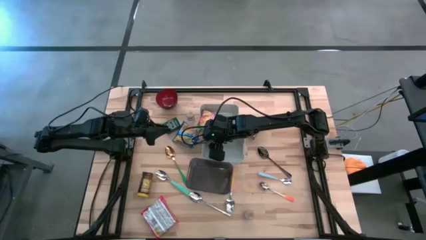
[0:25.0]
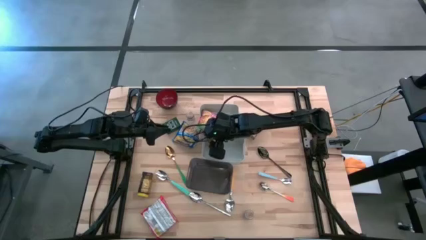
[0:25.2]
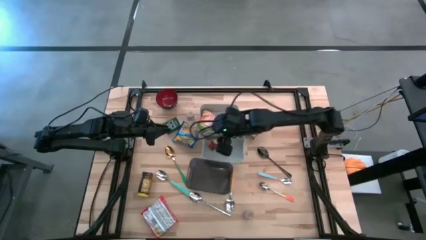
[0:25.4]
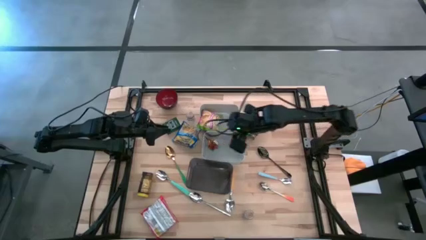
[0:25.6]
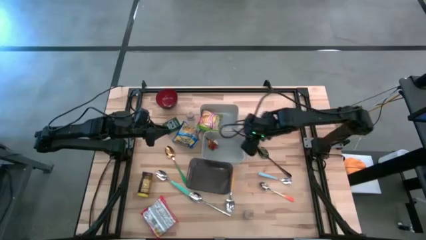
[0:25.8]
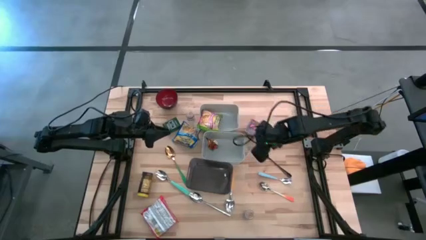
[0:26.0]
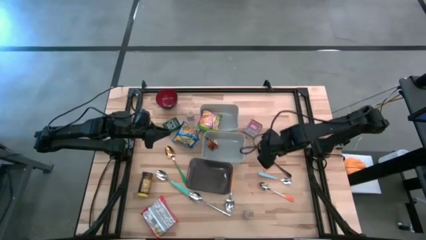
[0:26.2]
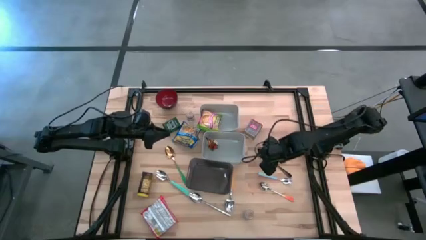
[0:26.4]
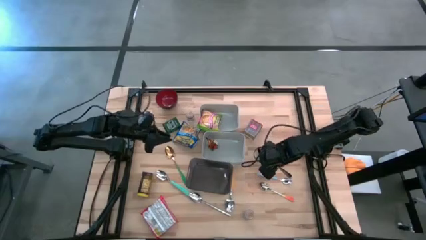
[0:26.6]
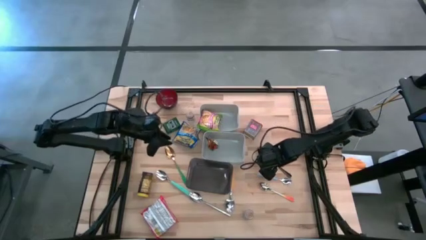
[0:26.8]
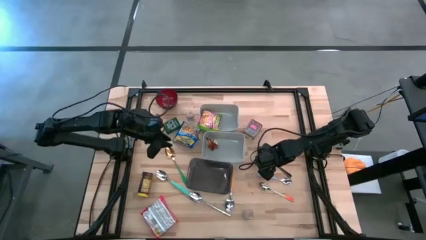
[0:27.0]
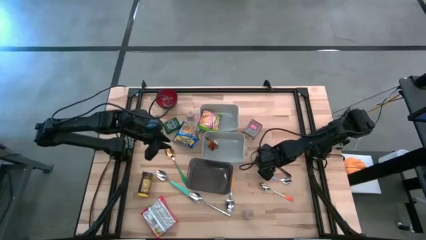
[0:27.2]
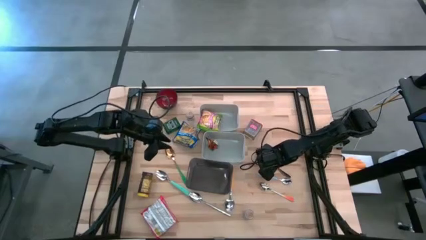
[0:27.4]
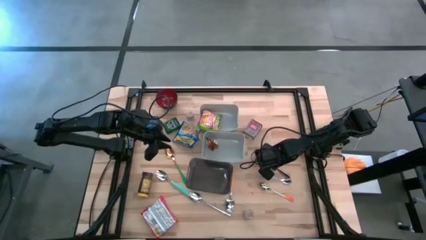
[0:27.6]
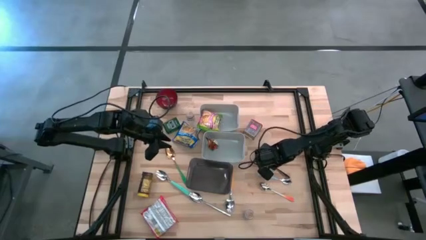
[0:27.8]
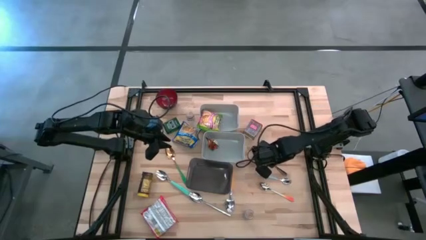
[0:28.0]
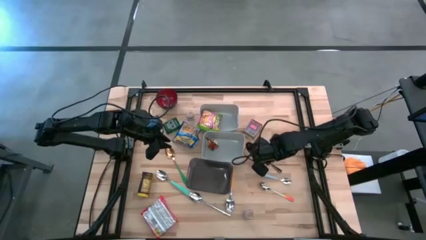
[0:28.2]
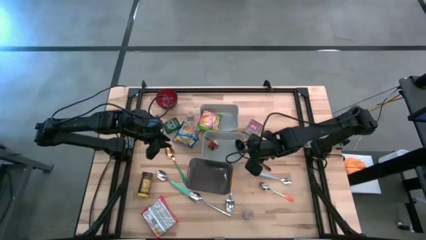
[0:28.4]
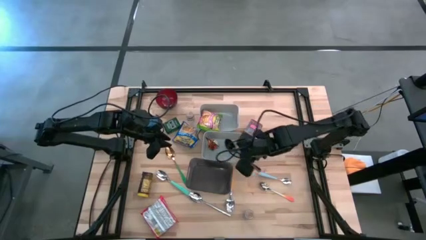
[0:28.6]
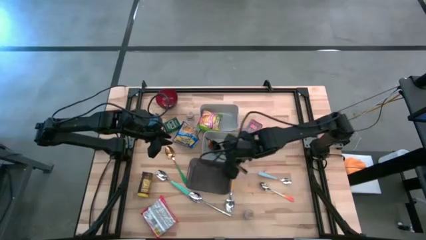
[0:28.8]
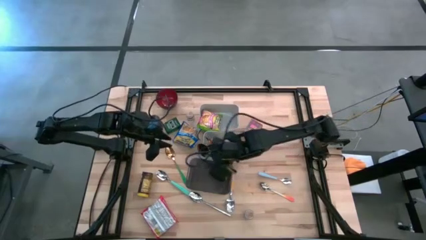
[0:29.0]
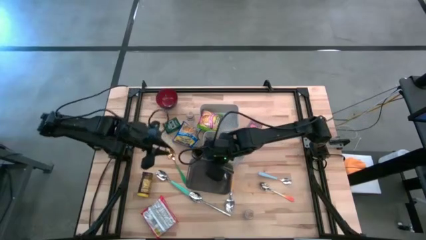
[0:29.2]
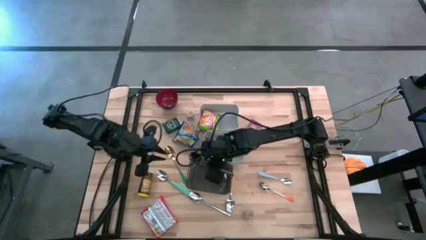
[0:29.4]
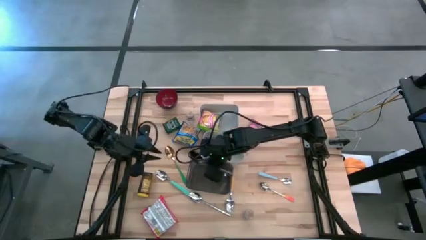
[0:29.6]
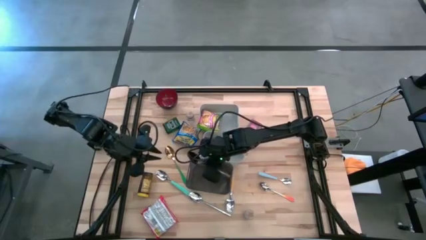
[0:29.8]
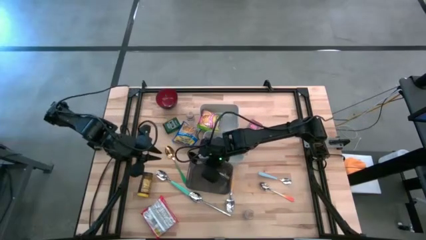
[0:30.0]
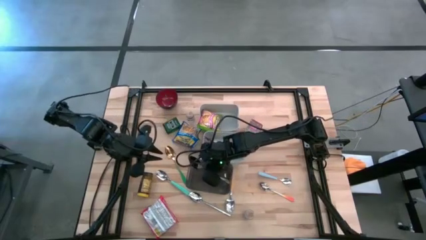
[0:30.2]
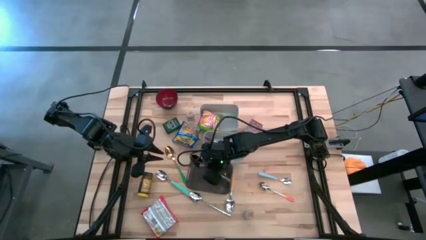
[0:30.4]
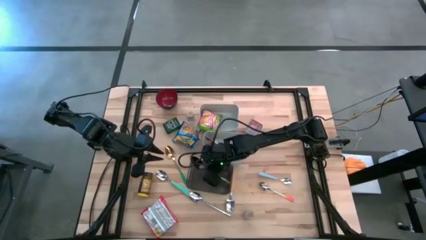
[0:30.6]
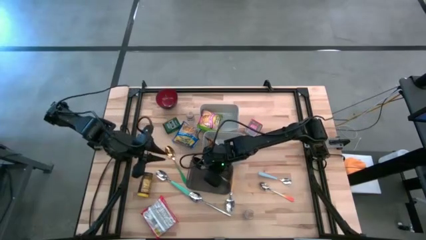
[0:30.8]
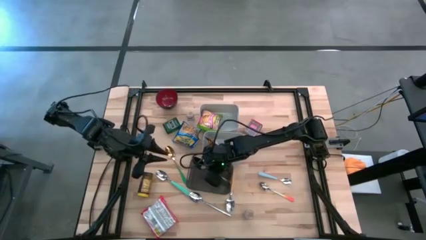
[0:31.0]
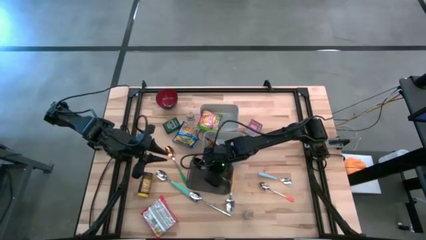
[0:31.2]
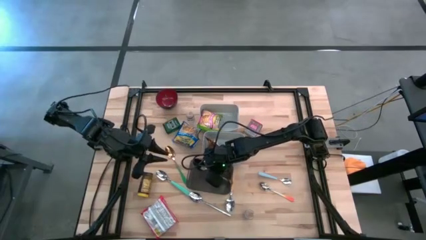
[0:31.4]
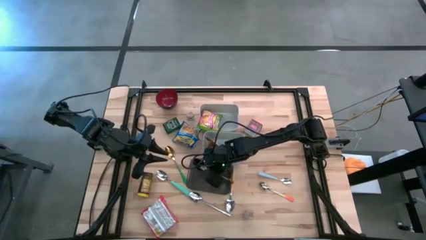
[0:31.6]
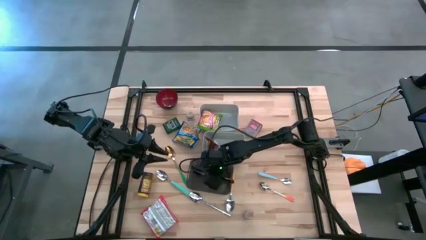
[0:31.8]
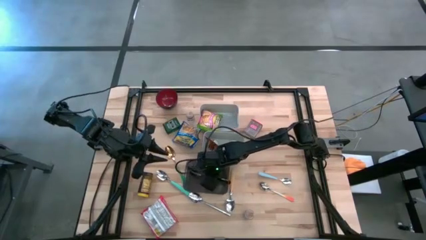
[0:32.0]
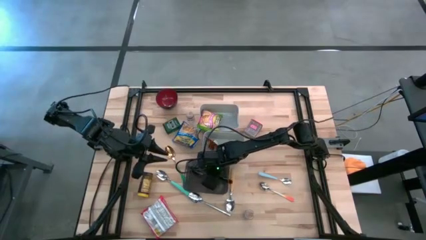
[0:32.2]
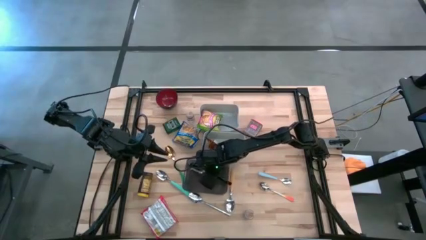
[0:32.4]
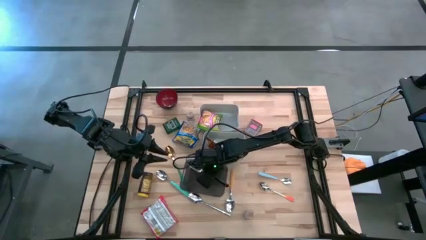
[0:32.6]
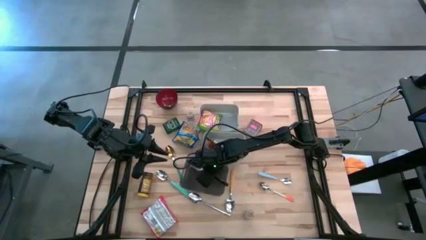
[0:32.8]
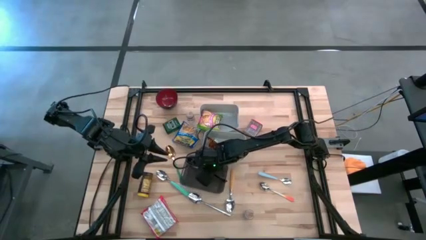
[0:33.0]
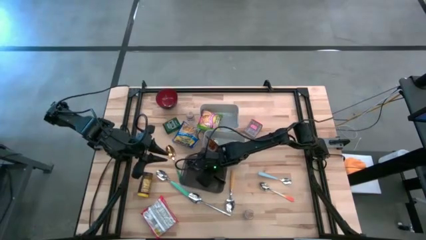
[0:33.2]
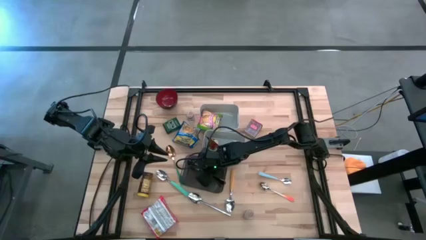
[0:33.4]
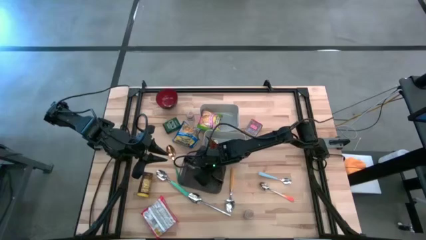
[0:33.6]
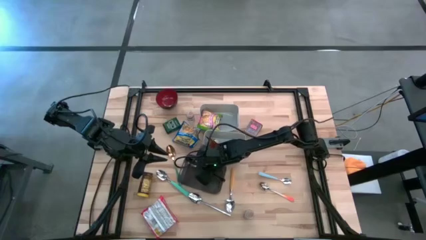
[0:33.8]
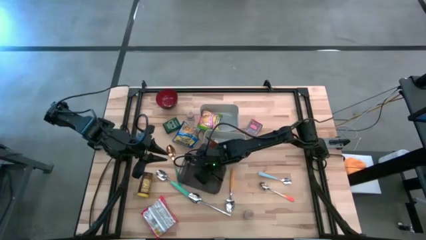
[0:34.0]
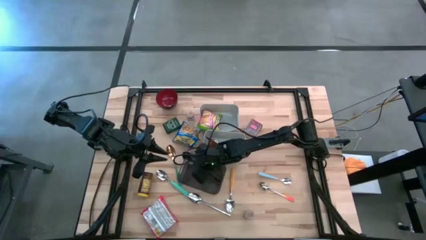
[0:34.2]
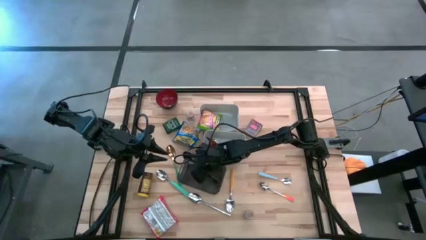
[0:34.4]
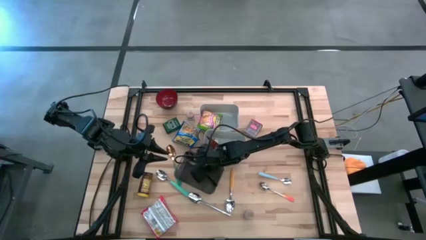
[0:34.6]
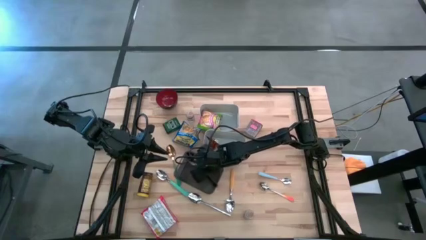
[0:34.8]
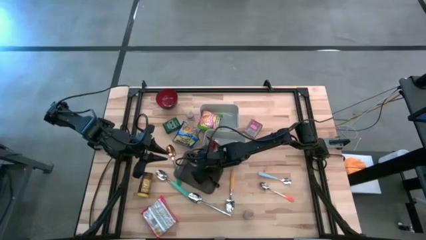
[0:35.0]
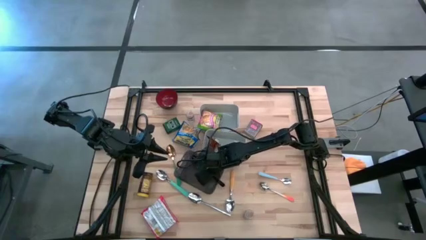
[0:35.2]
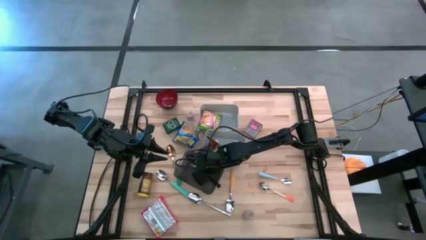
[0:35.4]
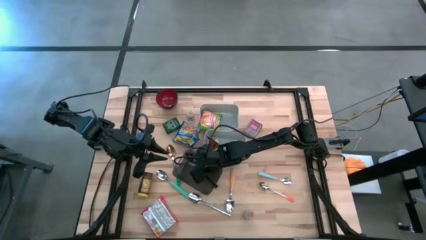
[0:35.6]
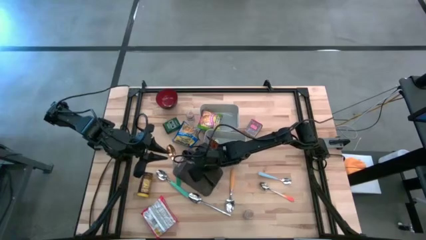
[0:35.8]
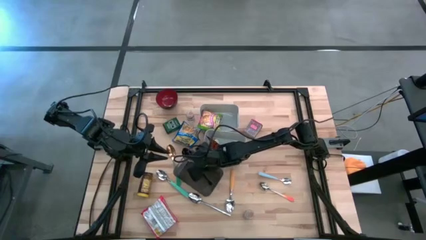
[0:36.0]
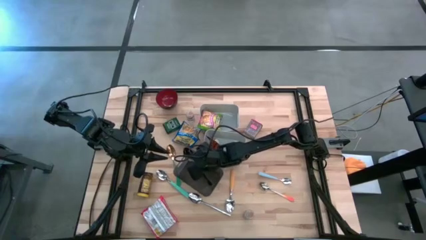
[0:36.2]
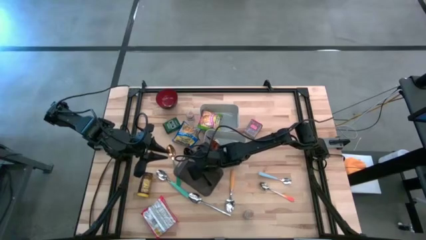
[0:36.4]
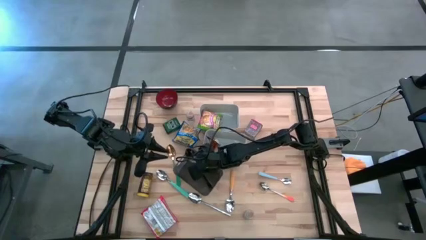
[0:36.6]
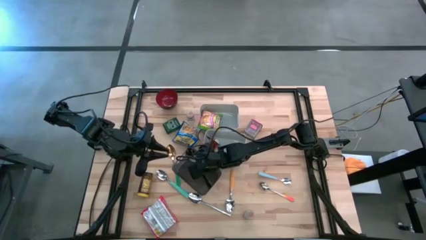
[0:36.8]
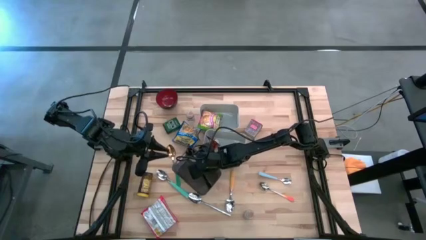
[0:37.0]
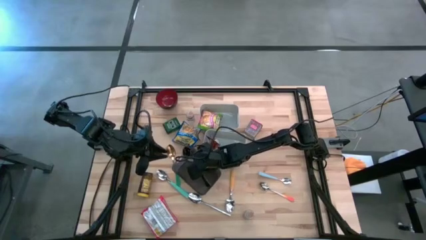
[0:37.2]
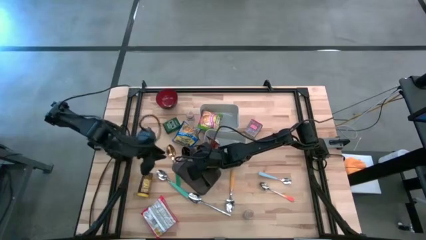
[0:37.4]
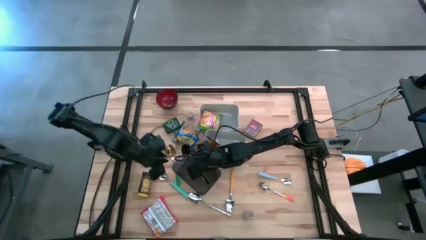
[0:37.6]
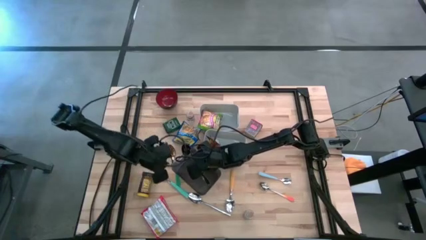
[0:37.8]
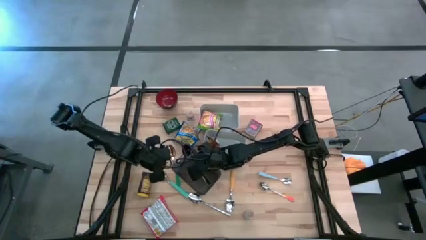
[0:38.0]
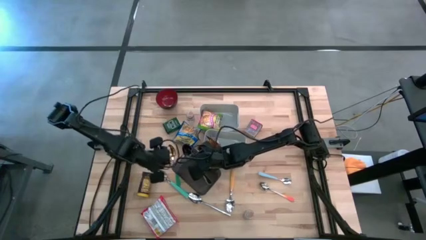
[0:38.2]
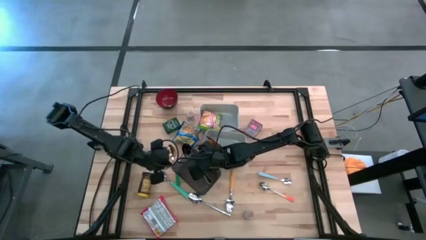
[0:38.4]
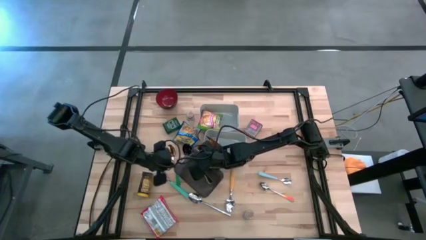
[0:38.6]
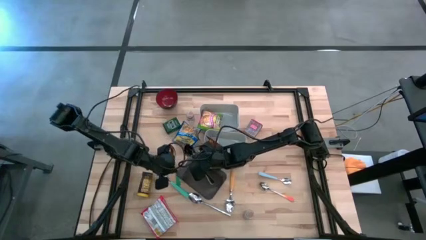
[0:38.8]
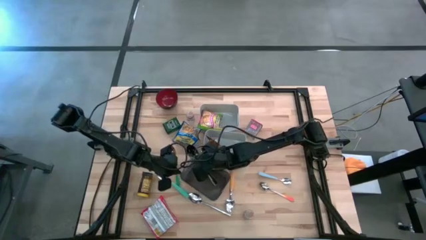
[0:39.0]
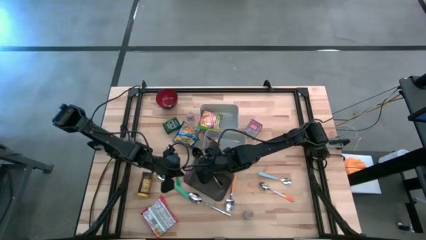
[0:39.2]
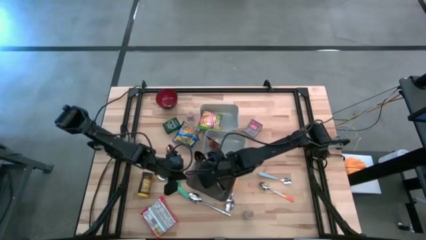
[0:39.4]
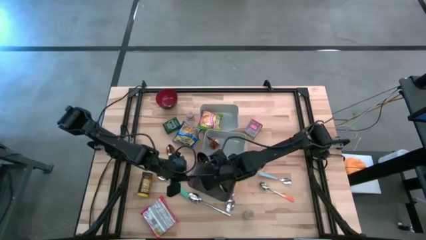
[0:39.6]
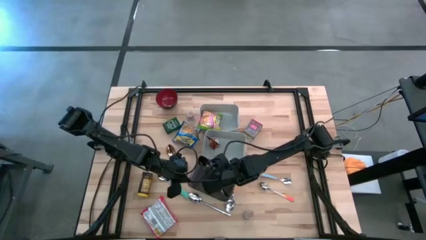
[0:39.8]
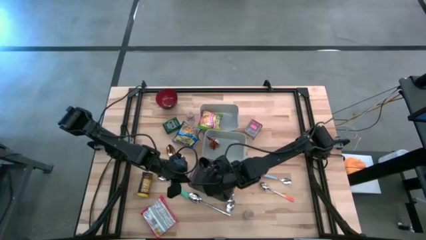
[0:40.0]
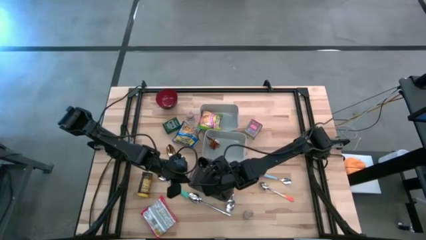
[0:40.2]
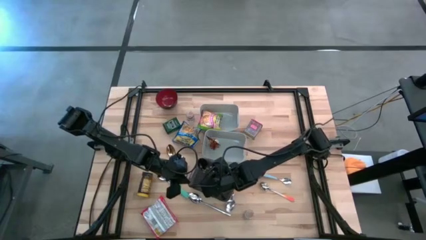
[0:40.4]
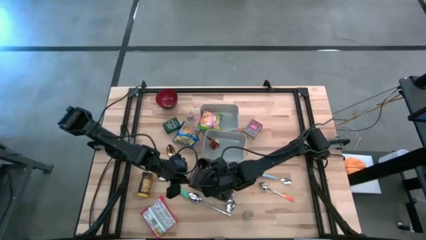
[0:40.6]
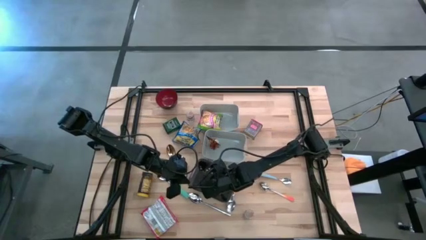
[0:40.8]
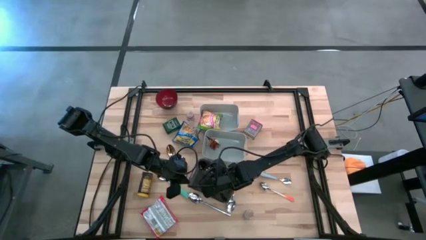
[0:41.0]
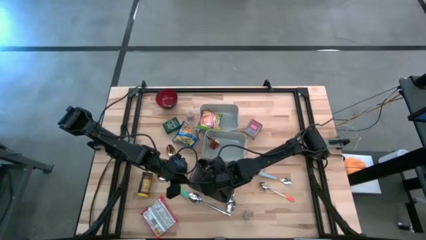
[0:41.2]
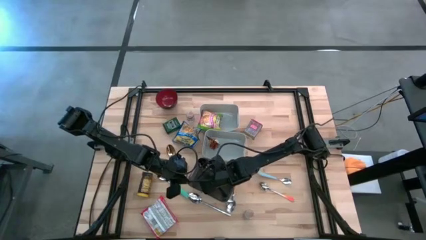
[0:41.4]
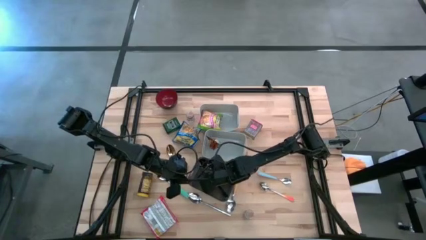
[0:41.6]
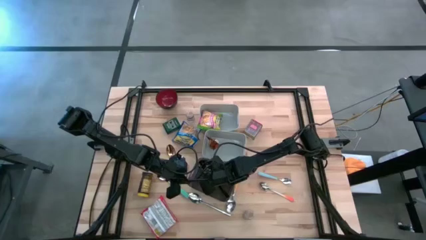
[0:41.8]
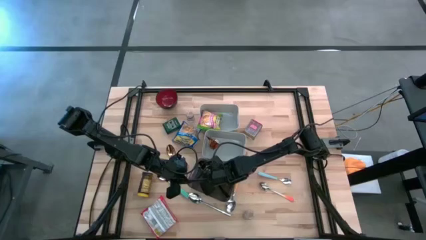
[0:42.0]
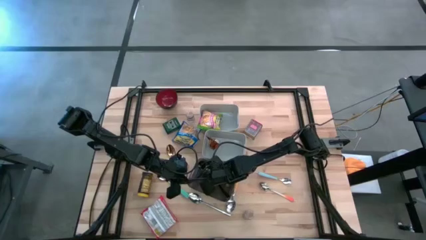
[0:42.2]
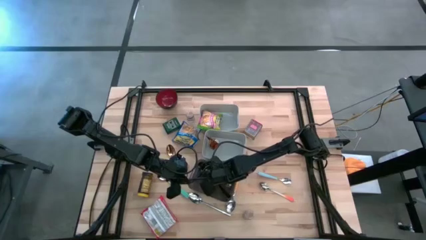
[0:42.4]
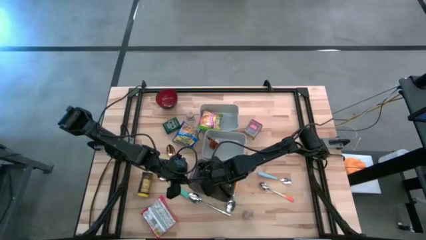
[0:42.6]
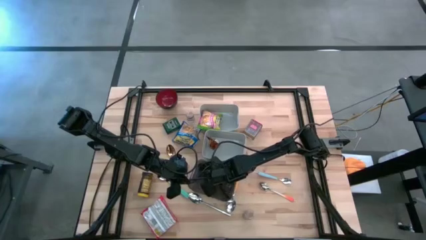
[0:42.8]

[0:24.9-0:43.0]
Put the black spoon into the black bin
